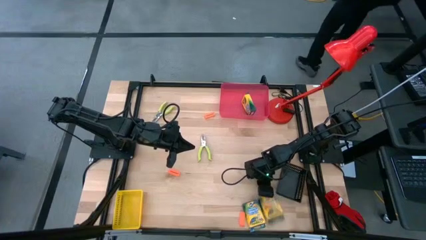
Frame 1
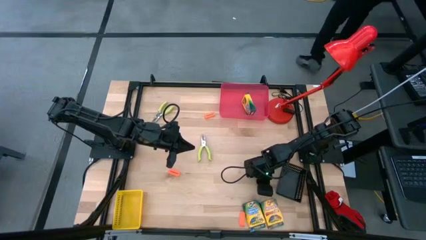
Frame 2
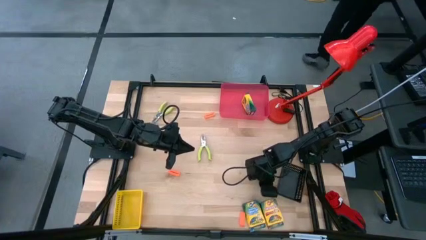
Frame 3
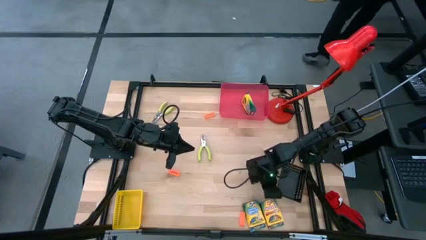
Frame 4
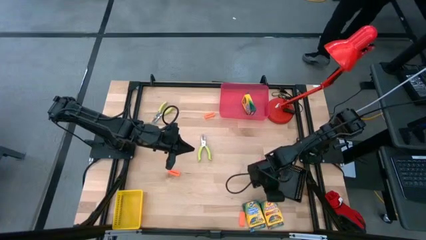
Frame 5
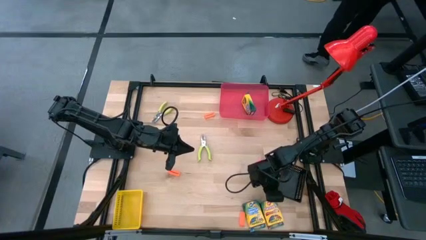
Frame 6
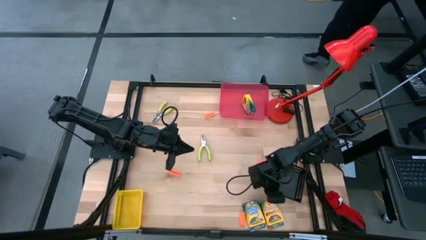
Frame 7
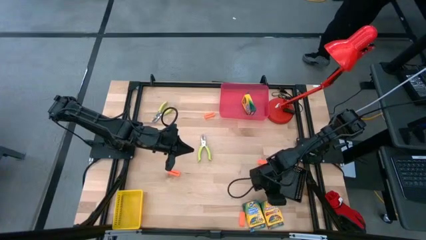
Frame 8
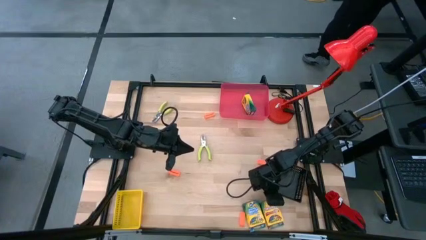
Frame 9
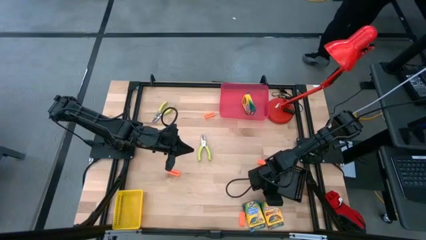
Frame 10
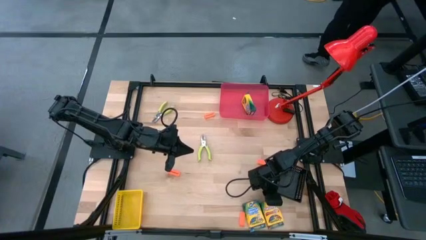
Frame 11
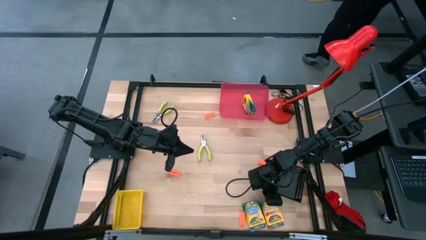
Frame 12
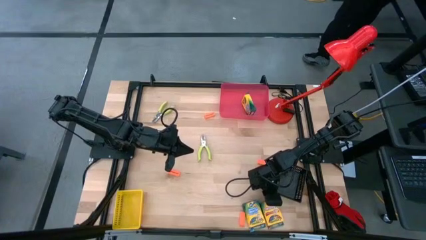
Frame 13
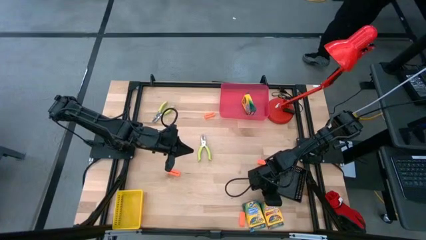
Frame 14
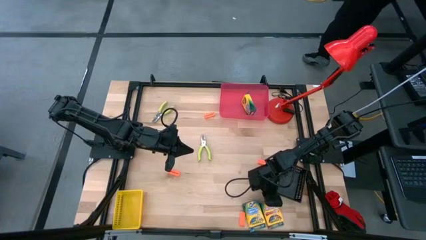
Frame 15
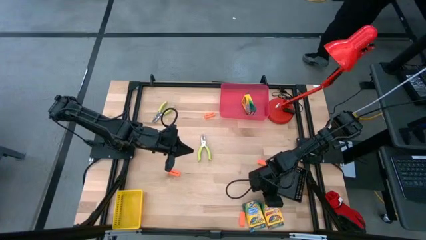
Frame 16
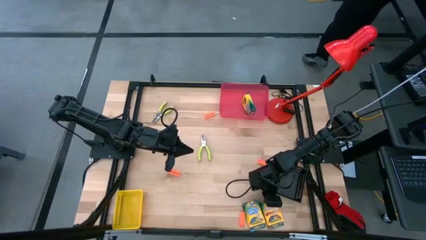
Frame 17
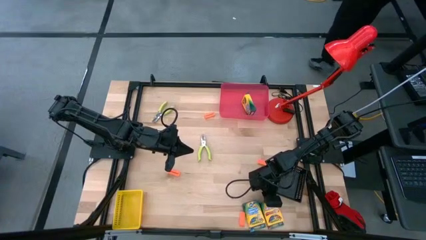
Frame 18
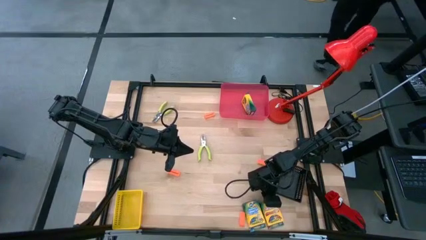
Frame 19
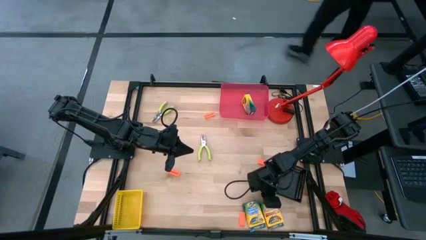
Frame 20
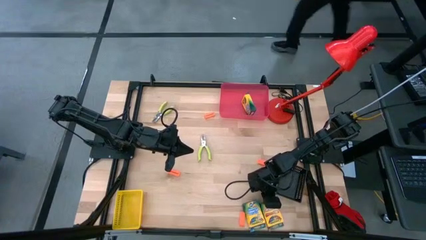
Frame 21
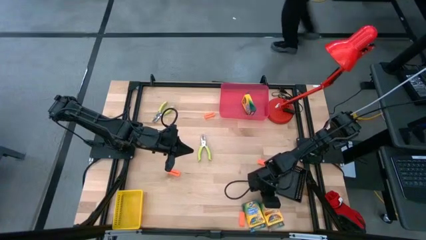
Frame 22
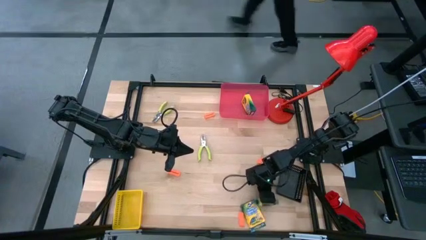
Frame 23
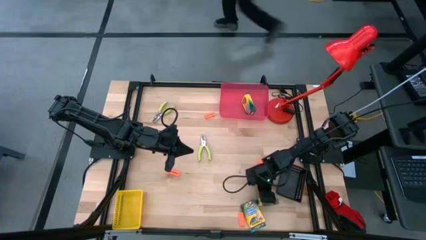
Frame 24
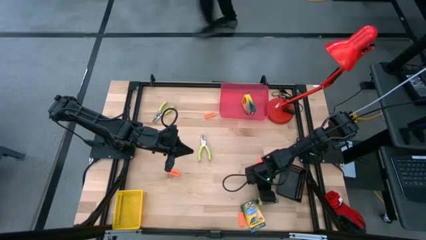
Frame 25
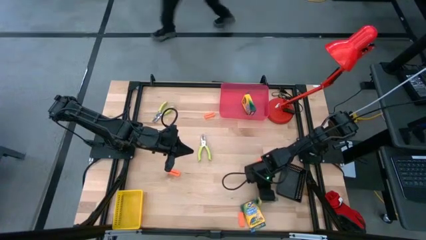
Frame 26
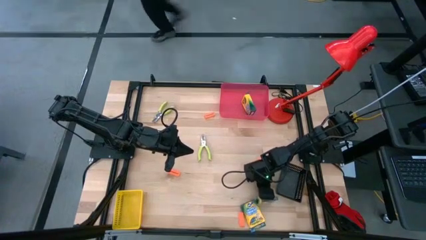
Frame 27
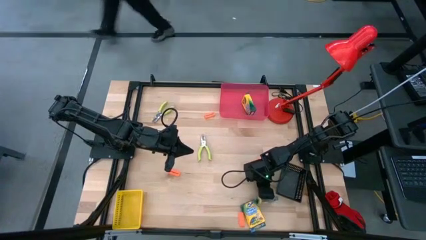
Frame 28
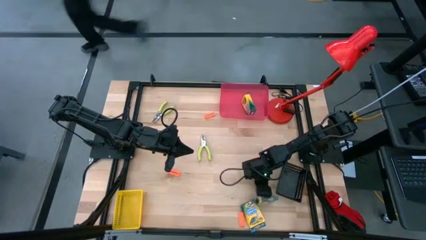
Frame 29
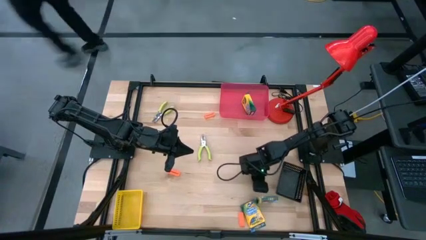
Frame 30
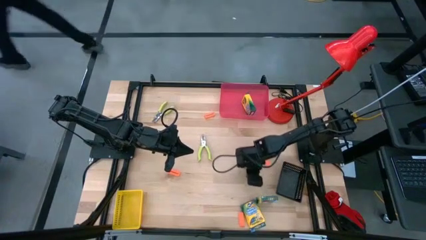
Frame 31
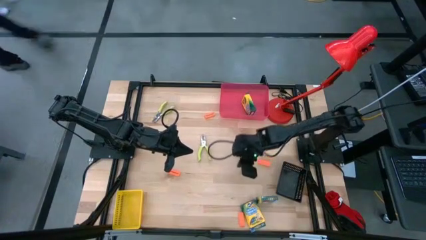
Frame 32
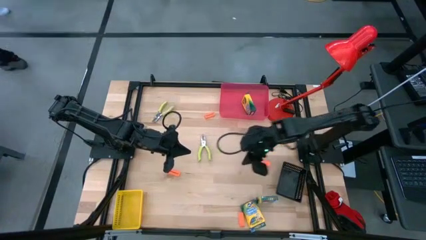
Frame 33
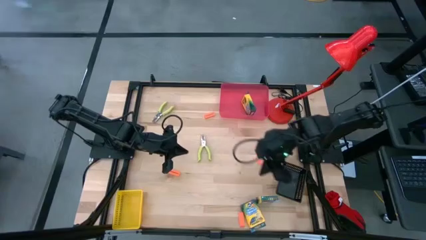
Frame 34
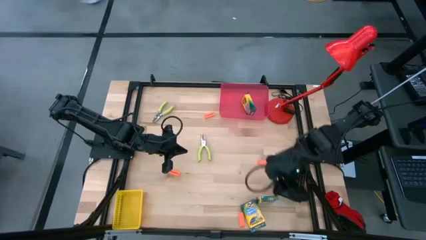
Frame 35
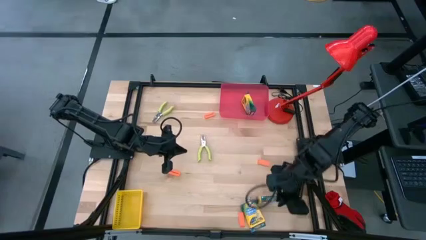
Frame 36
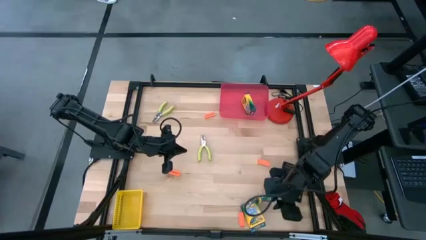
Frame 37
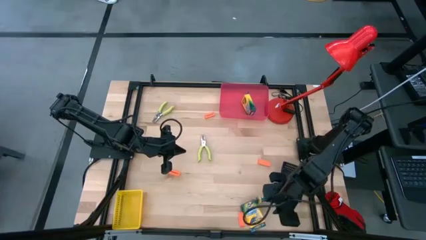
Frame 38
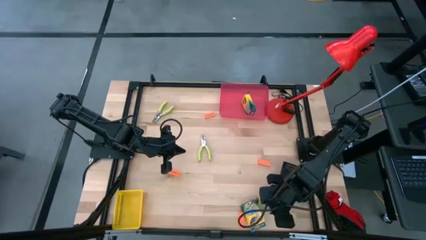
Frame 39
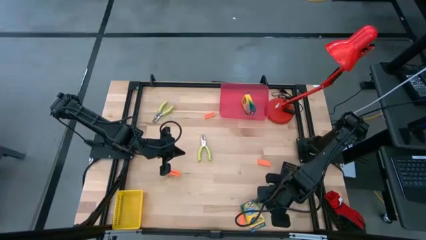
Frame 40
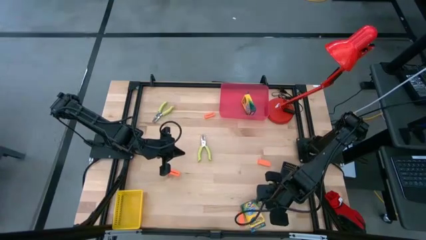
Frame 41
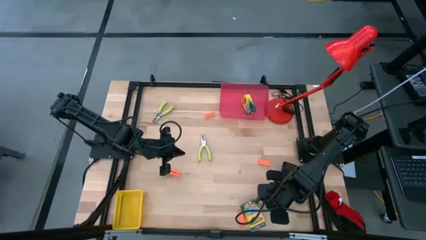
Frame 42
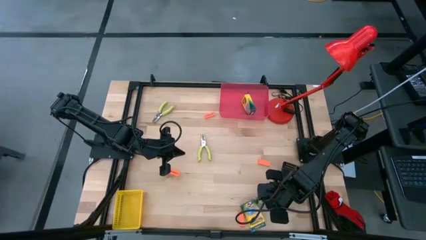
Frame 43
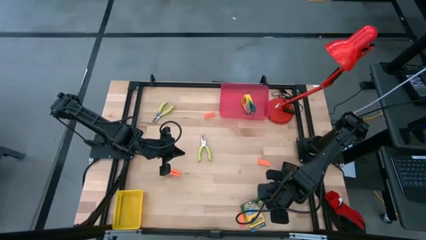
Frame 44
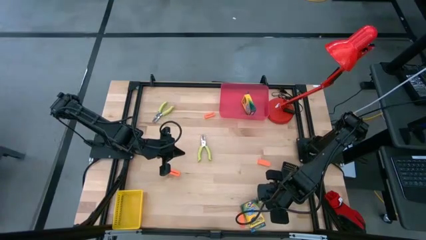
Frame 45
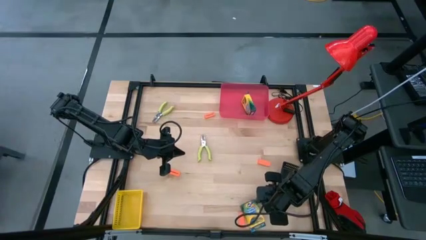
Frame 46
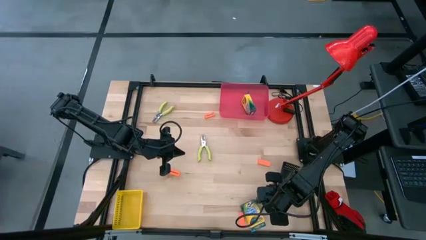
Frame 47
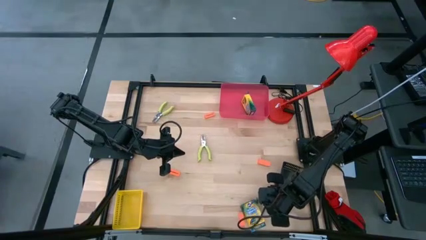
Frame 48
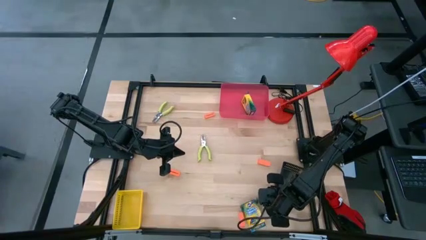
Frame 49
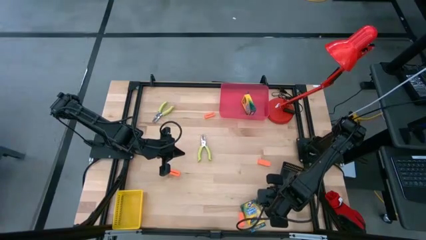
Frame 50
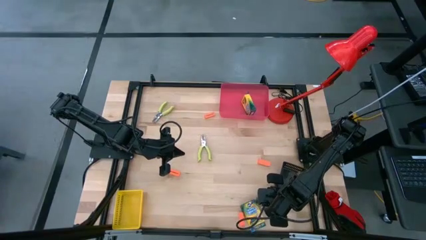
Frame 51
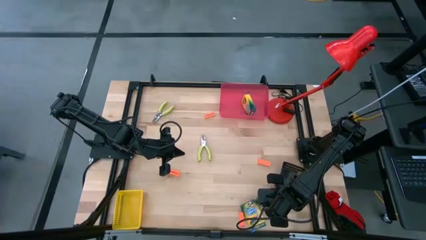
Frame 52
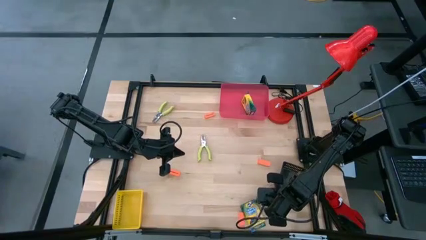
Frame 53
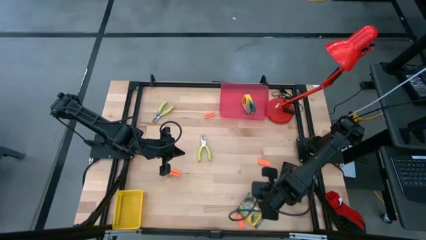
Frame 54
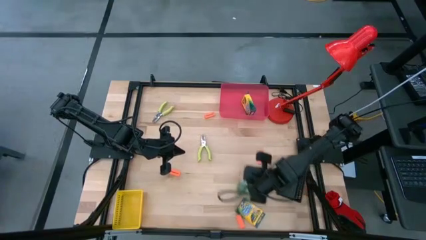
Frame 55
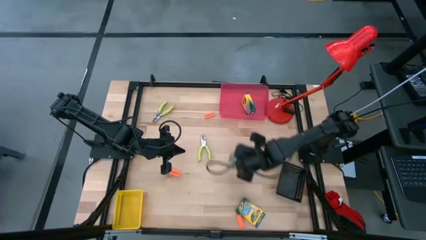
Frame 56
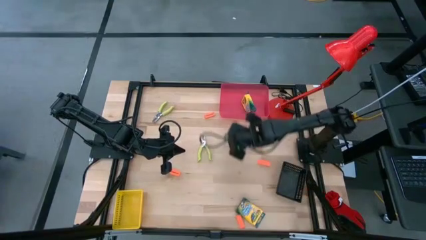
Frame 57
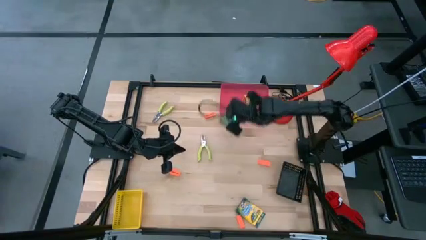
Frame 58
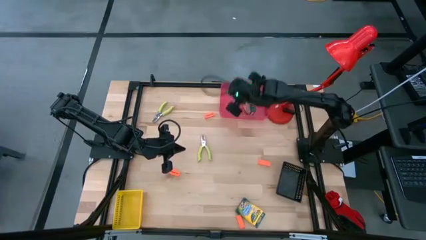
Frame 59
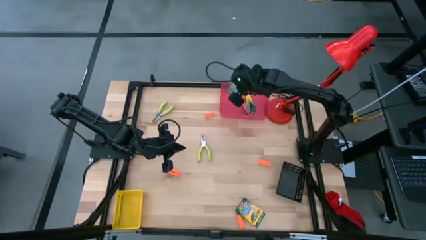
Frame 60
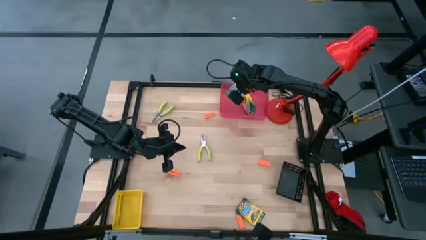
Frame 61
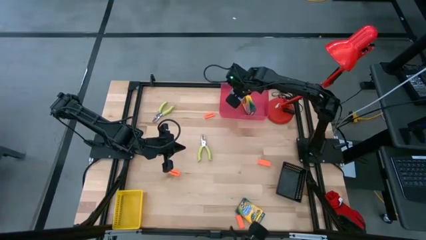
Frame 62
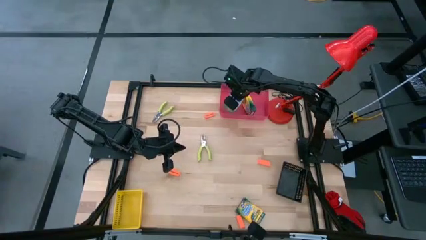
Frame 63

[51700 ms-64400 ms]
Task: Pick & Place School Supplies
Put the yellow crayon box into the red bin

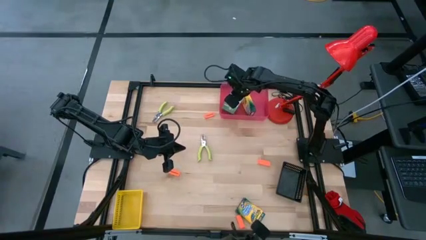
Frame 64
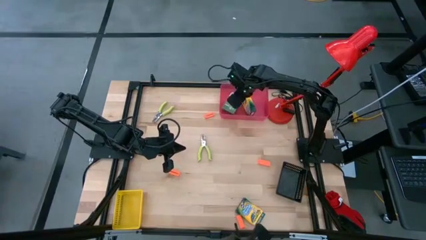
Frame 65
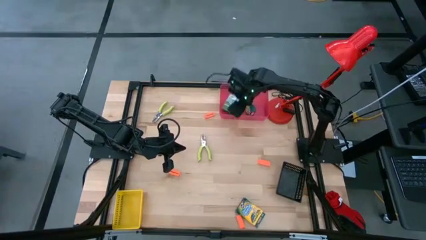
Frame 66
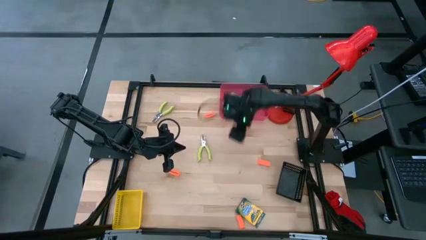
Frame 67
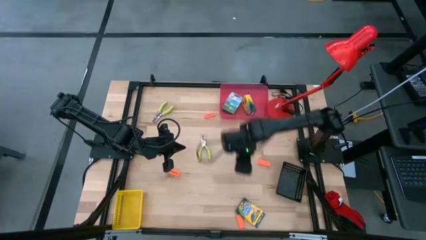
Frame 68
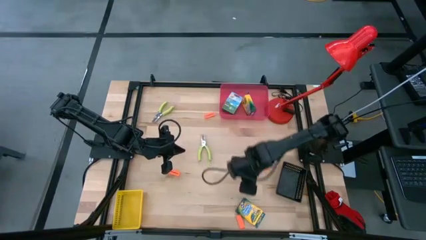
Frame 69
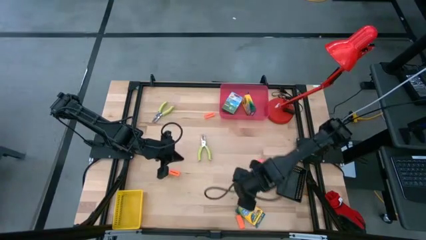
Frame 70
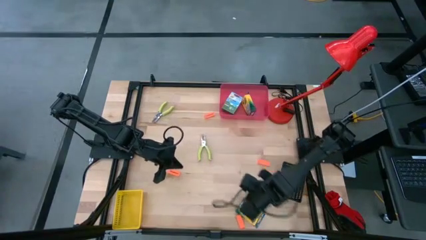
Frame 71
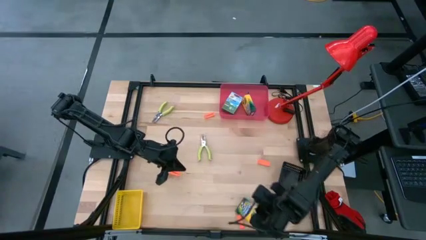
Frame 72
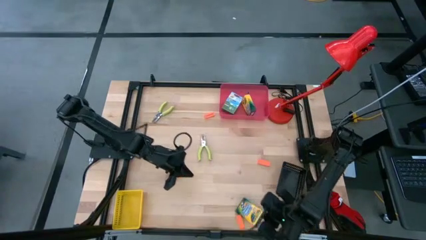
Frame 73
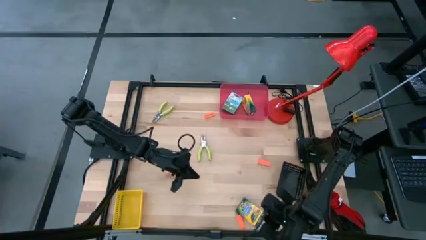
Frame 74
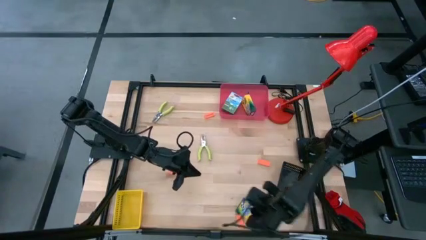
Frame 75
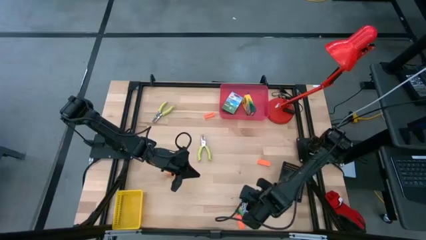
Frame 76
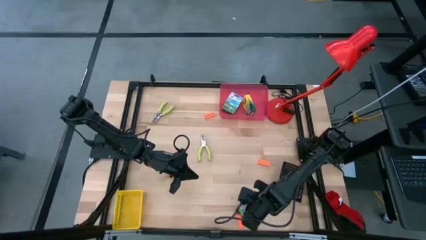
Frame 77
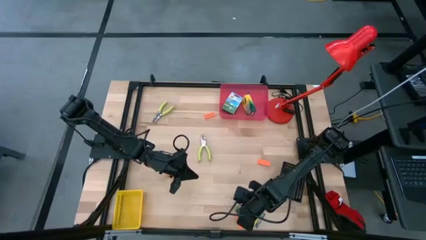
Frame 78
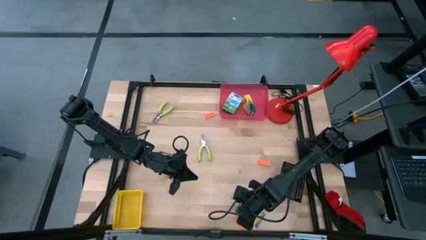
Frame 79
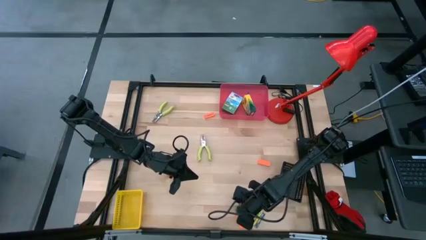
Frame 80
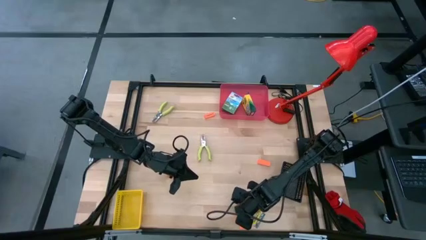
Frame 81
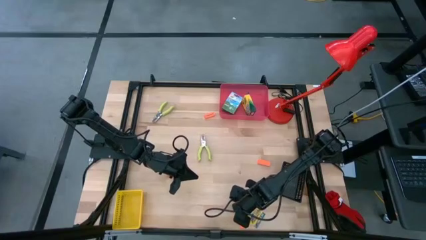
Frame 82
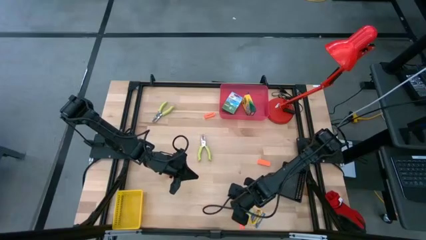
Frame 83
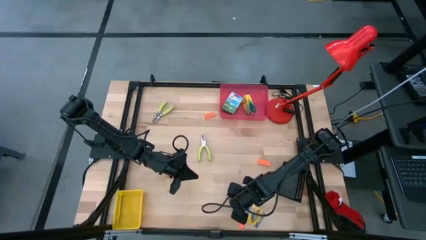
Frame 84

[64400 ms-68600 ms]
Put the yellow crayon box into the red bin
